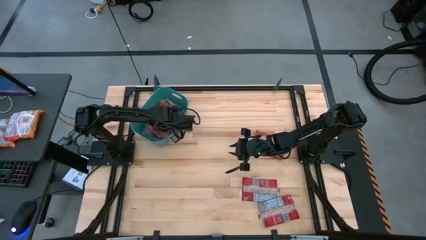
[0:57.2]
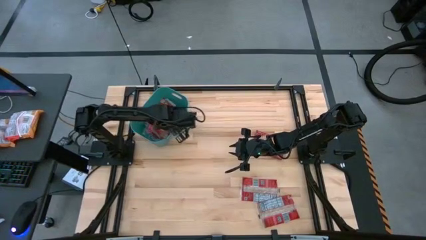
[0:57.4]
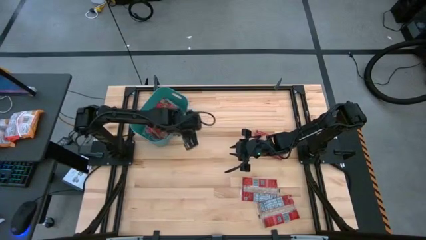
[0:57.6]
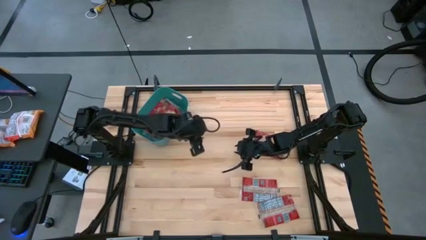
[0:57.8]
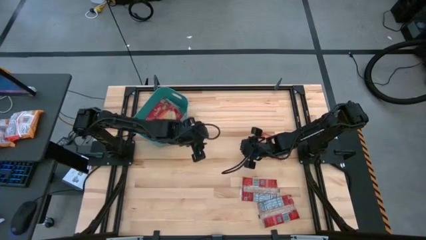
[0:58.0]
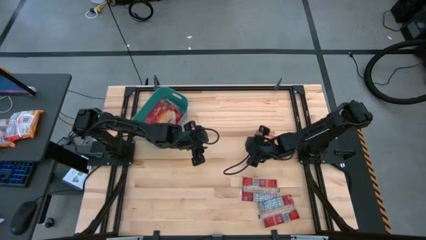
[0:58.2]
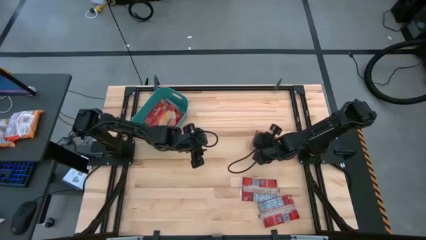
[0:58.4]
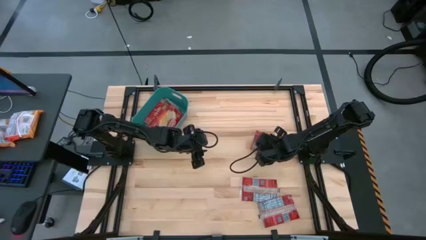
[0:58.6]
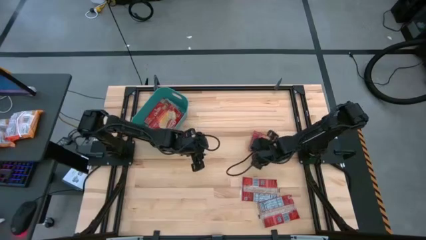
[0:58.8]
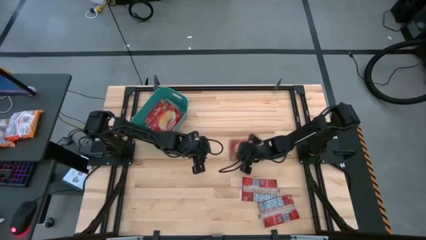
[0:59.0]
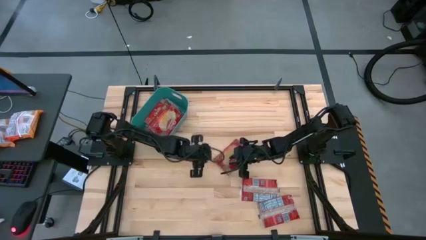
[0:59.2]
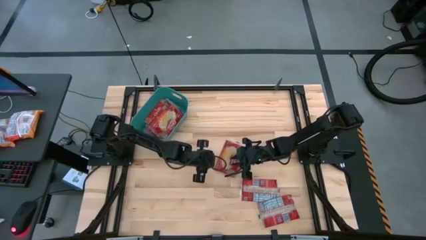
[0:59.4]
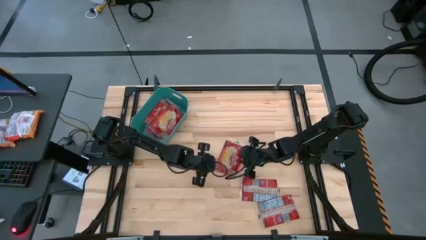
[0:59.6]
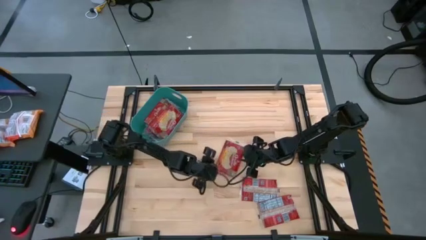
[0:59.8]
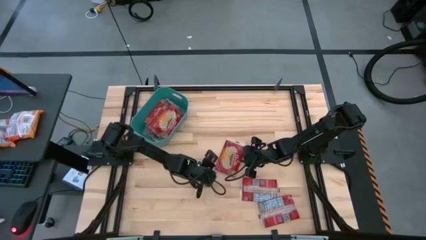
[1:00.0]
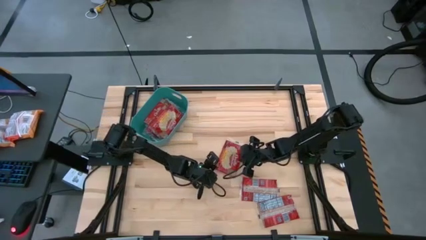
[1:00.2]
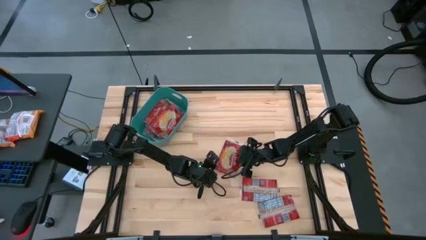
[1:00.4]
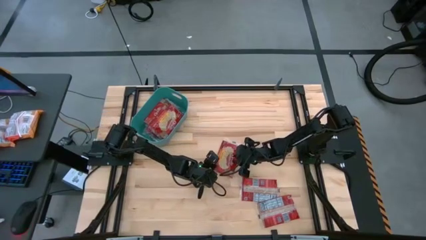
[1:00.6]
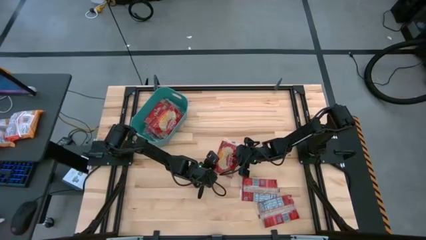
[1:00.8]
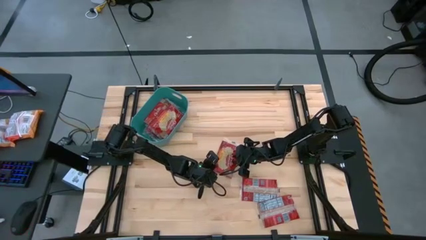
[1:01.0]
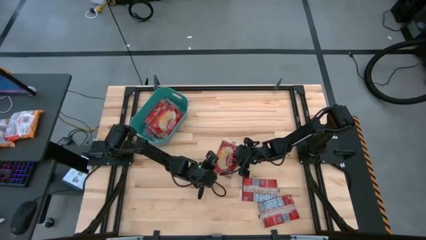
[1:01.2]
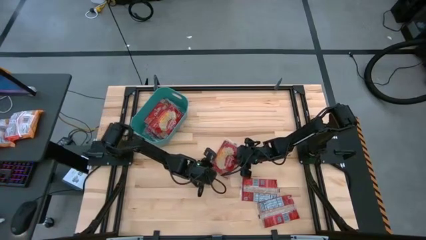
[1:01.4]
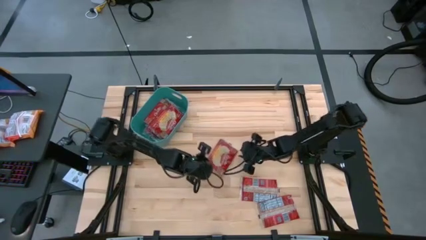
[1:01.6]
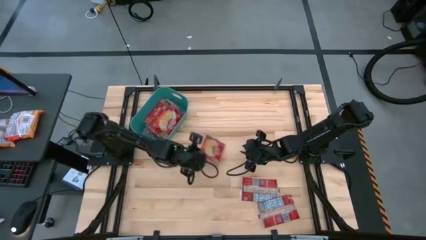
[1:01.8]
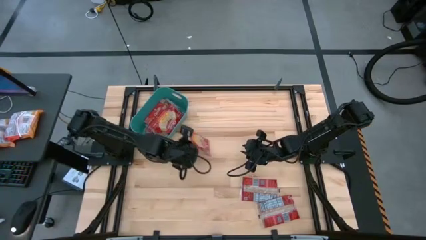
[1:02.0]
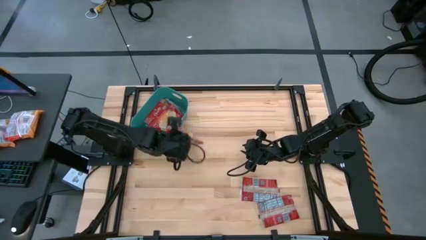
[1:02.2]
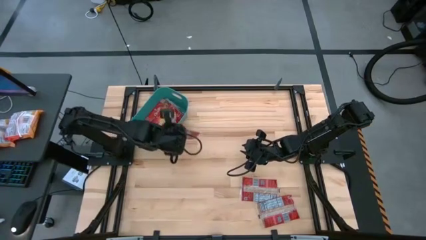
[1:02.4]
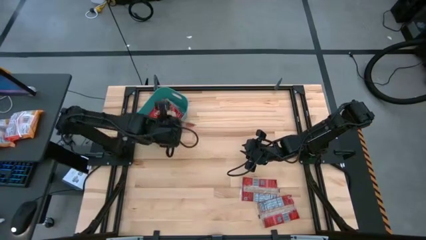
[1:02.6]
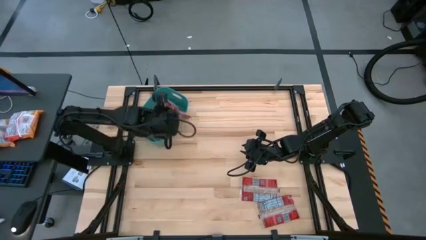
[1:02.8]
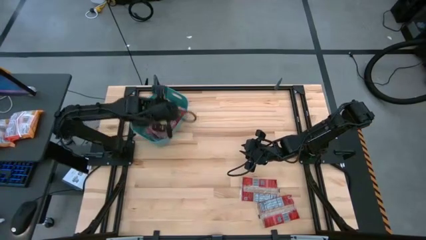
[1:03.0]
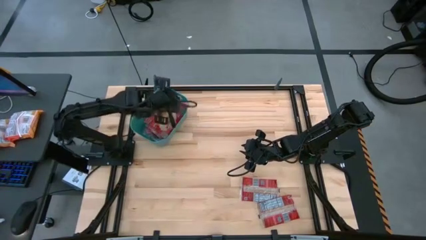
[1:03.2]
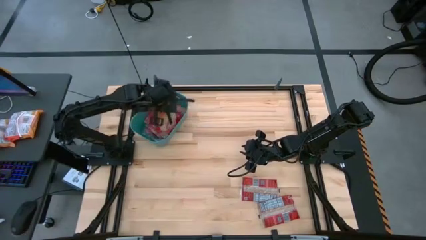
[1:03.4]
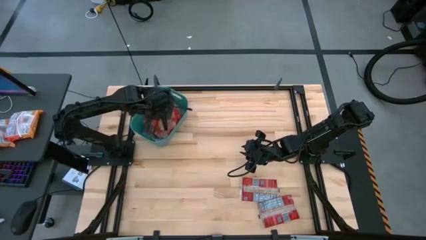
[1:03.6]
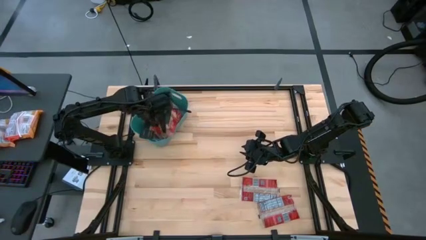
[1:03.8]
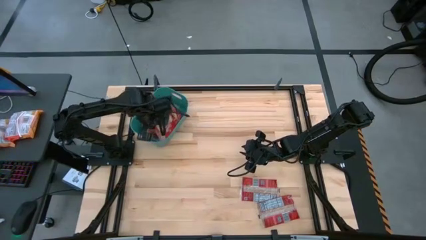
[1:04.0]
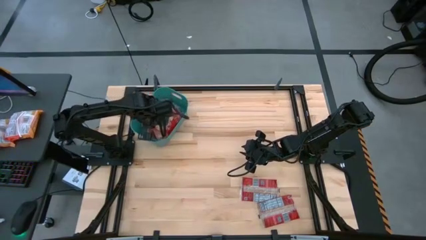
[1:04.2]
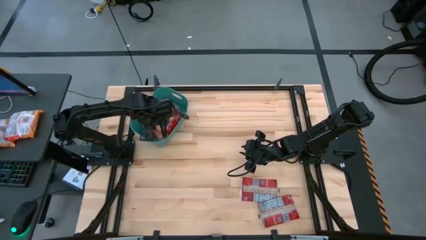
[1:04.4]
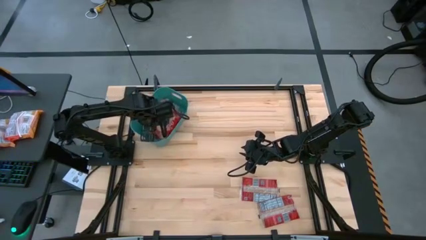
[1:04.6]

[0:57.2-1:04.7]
Task: Sort popcorn bags into baskets
Put the red popcorn bag into the green bin

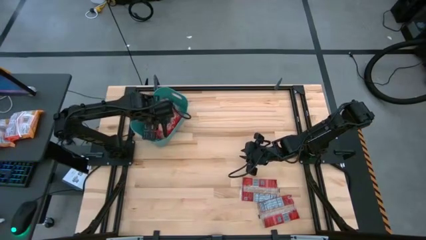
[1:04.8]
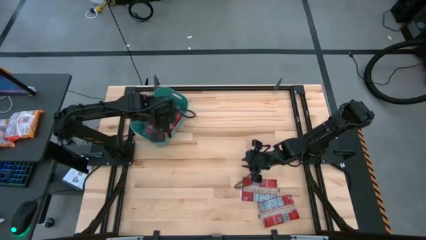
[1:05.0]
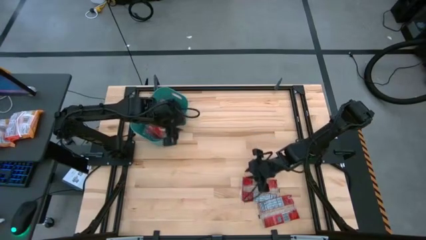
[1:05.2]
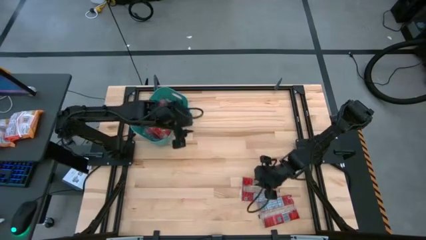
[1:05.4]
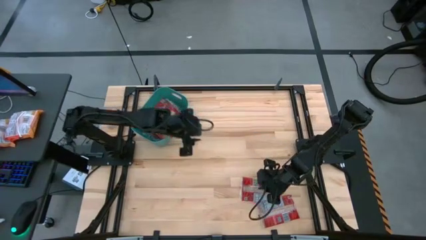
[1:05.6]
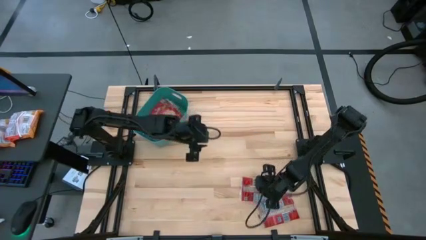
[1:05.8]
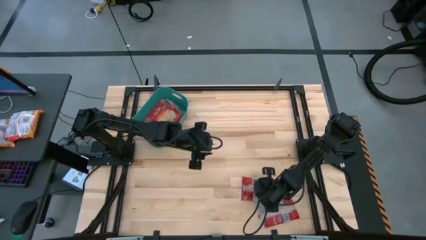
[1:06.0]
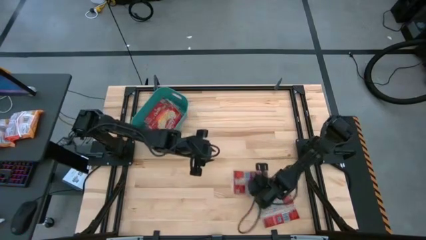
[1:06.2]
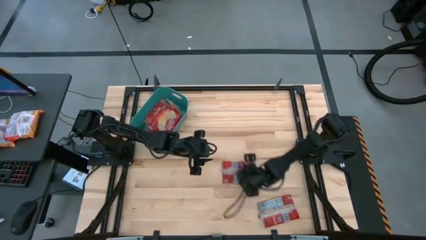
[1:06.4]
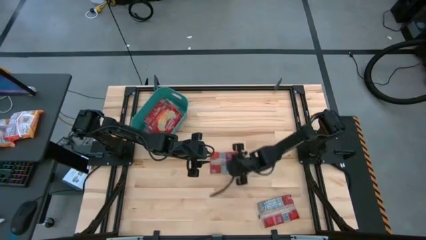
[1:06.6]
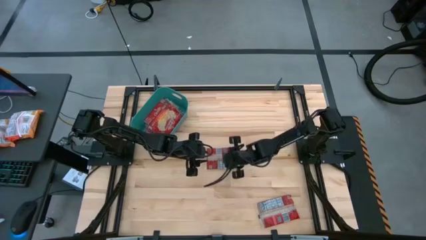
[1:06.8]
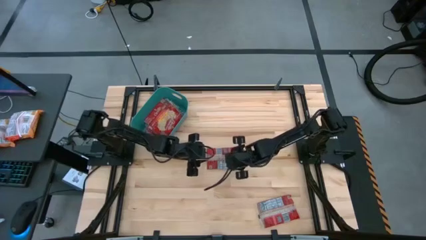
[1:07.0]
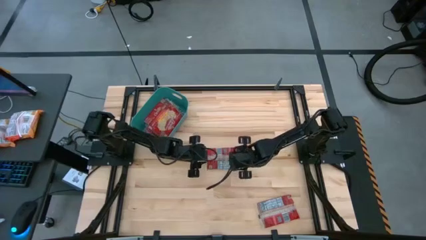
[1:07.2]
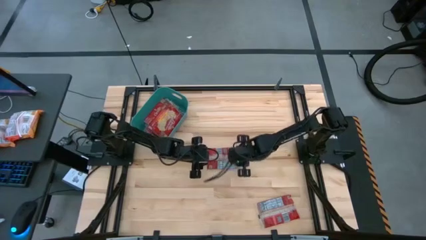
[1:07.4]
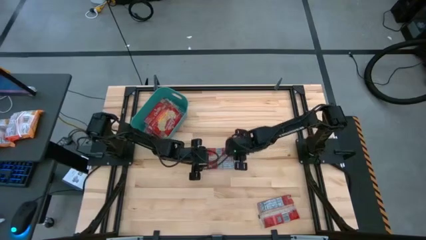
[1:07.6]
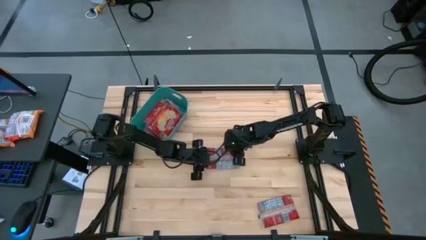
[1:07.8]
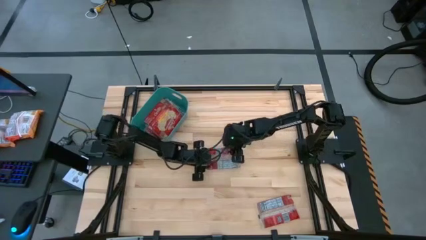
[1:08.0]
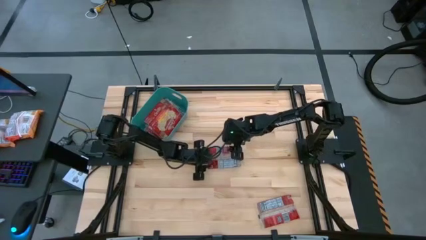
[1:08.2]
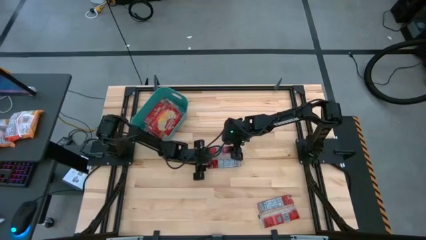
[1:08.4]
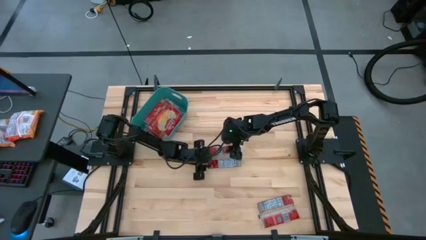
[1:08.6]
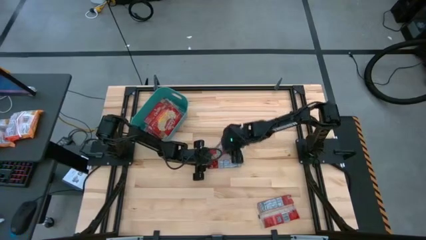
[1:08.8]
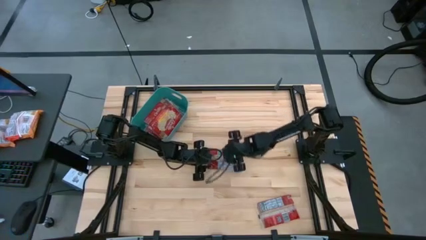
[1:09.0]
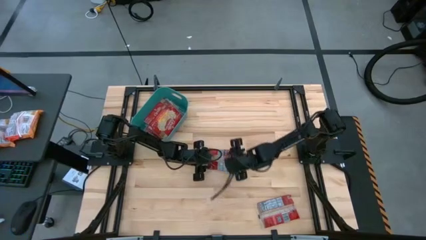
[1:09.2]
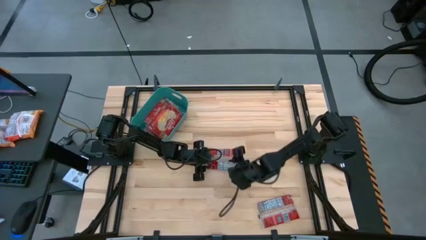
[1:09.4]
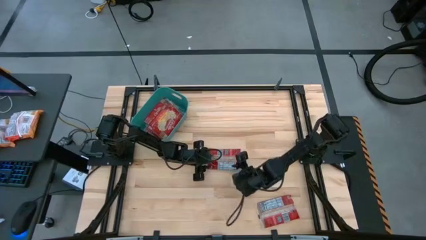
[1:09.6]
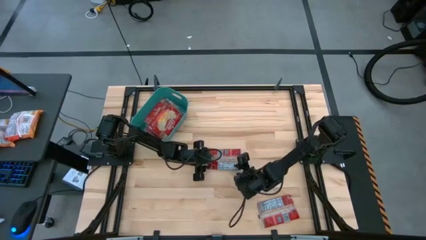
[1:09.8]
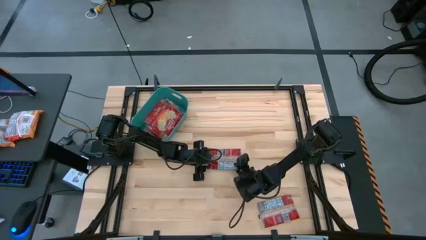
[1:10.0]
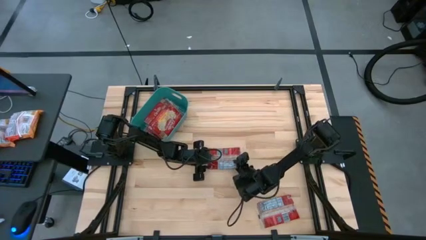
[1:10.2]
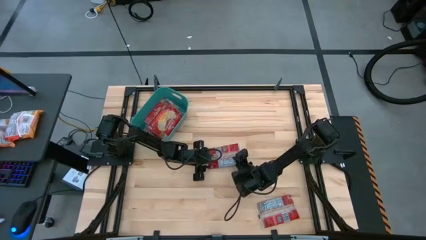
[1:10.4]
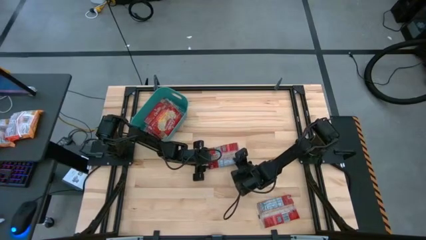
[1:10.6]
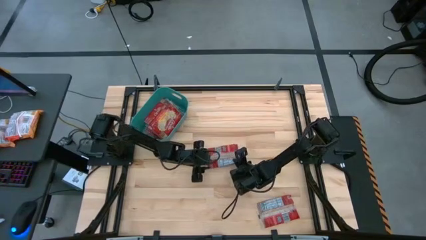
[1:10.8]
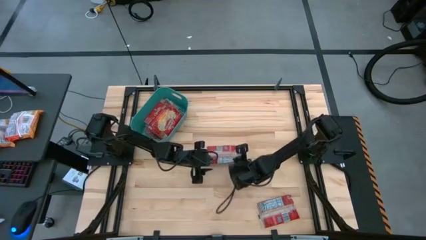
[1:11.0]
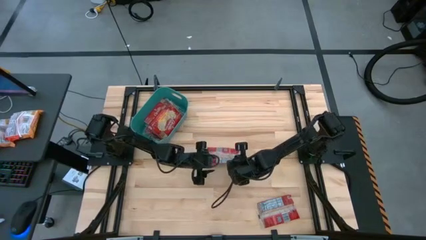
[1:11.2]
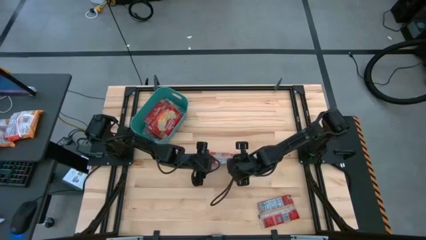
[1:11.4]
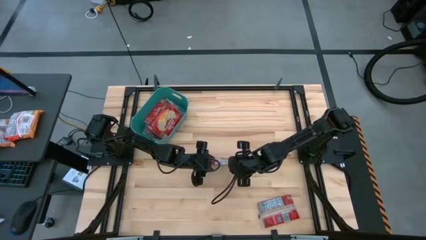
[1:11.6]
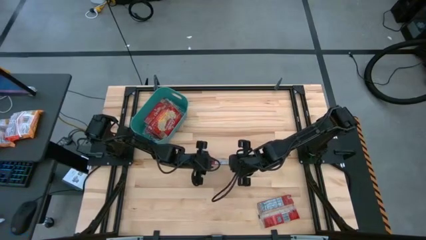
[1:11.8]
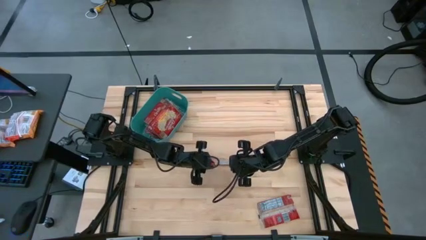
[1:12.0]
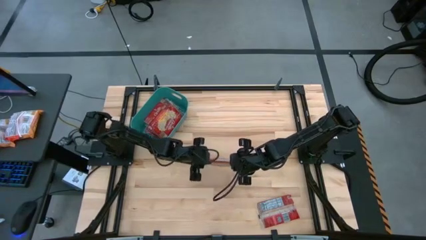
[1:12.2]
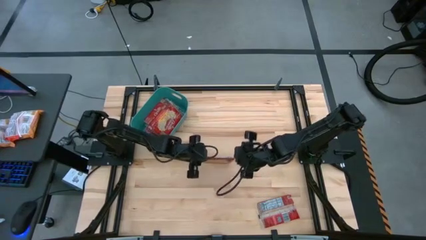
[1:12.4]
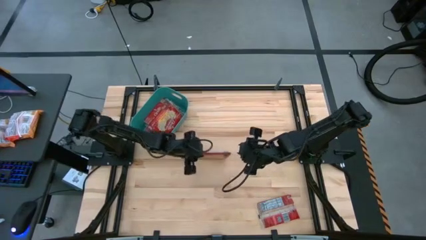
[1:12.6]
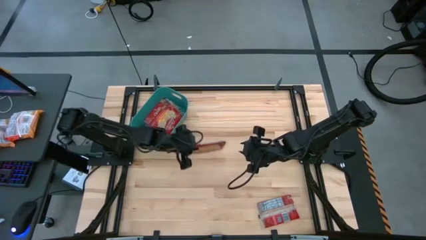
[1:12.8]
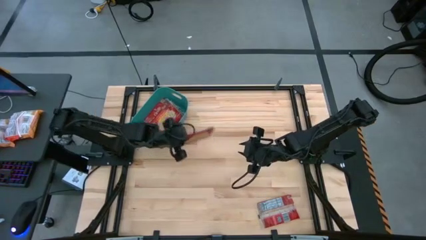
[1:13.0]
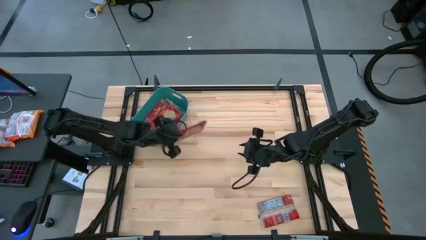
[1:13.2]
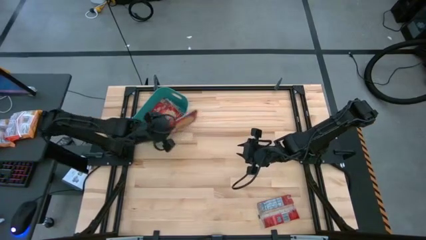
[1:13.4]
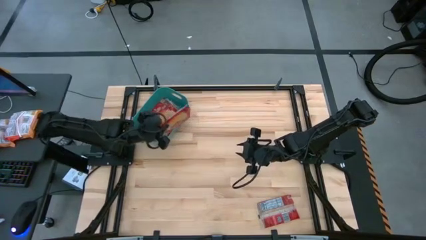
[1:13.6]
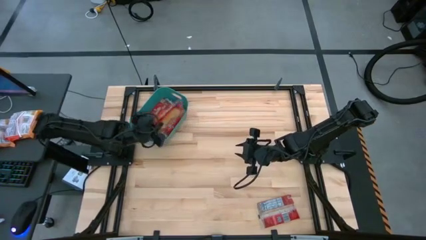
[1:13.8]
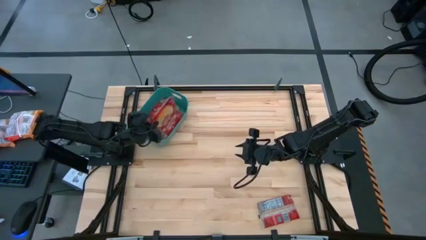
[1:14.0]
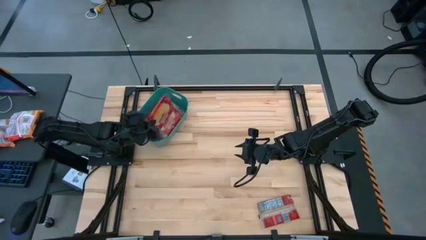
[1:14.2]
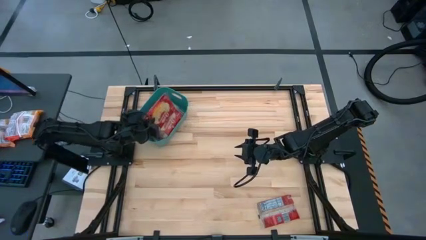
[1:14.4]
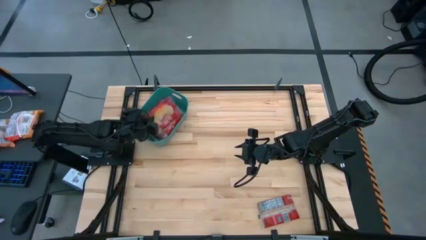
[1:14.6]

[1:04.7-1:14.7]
Put the red popcorn bag into the green bin
